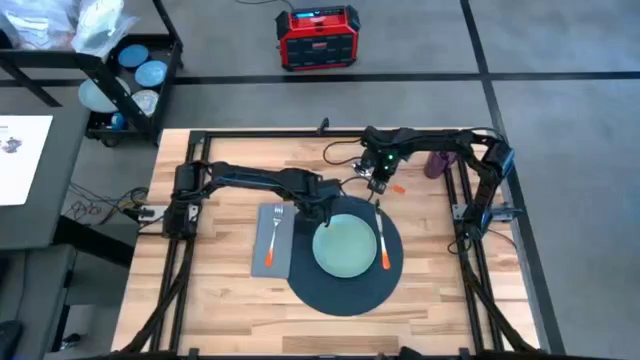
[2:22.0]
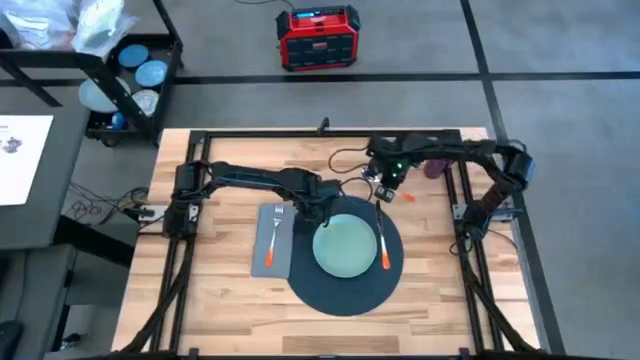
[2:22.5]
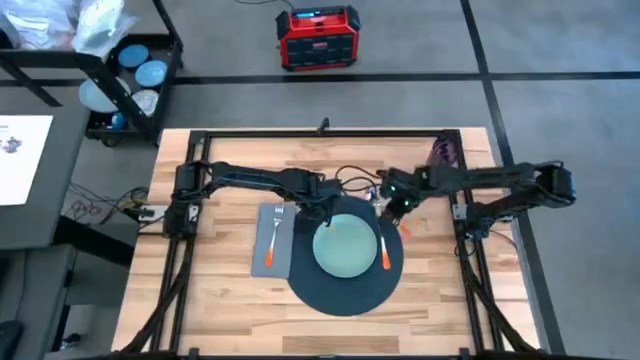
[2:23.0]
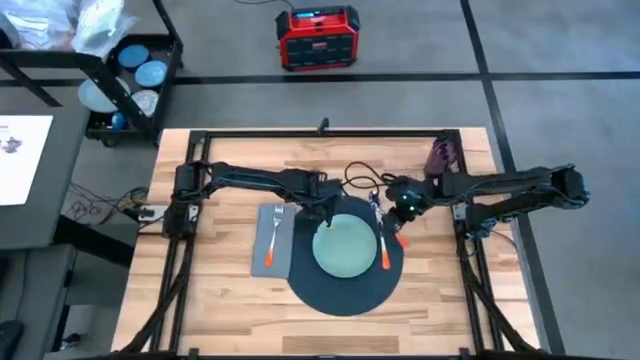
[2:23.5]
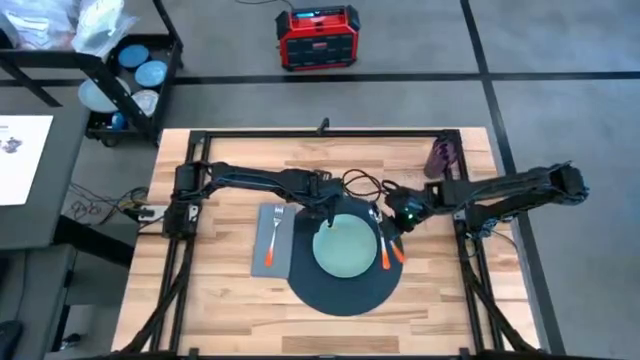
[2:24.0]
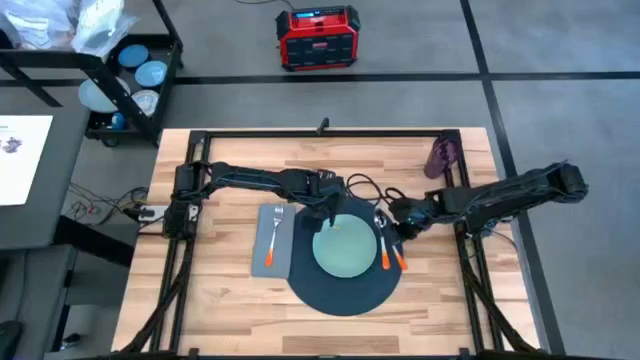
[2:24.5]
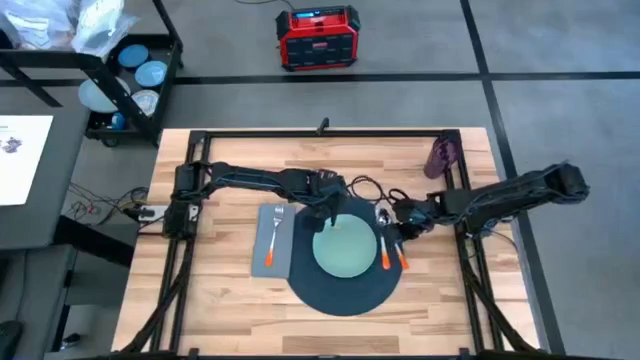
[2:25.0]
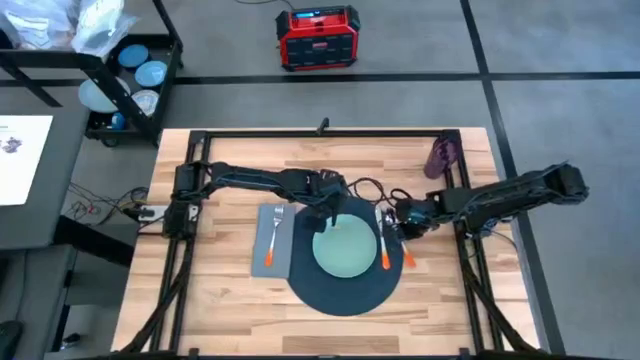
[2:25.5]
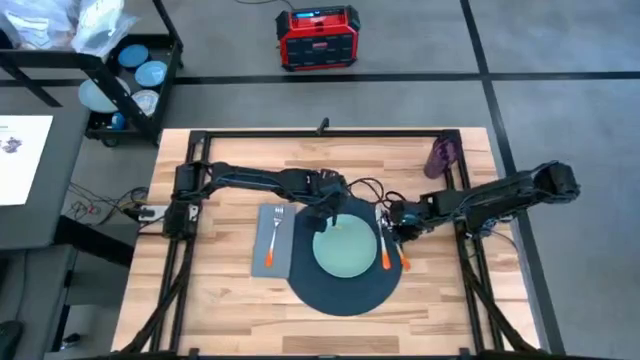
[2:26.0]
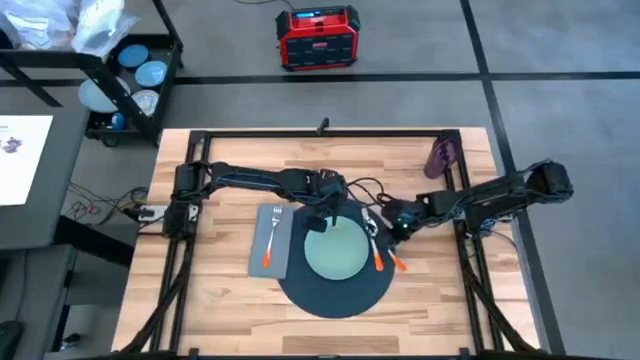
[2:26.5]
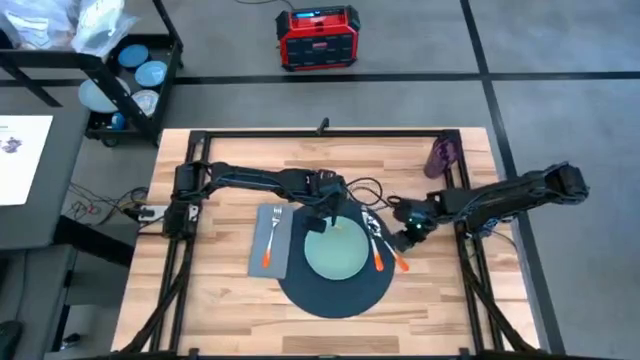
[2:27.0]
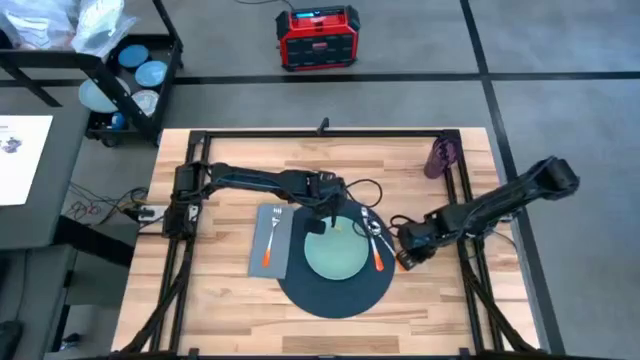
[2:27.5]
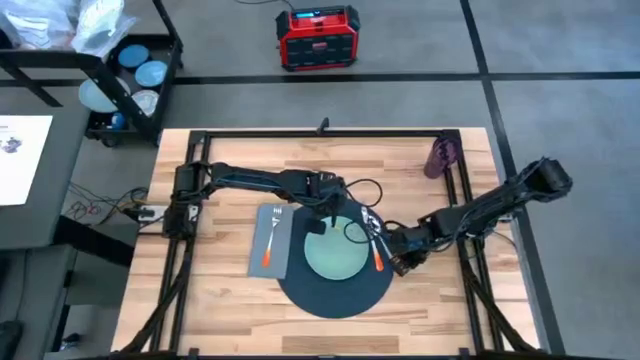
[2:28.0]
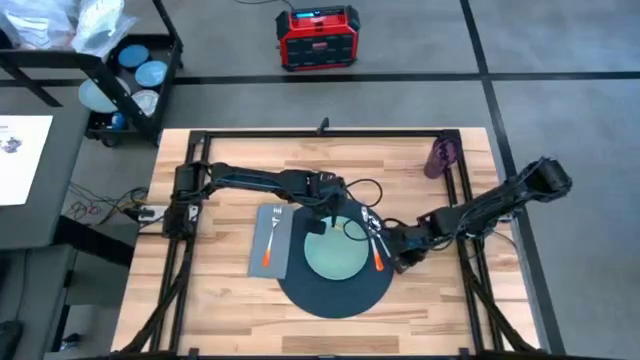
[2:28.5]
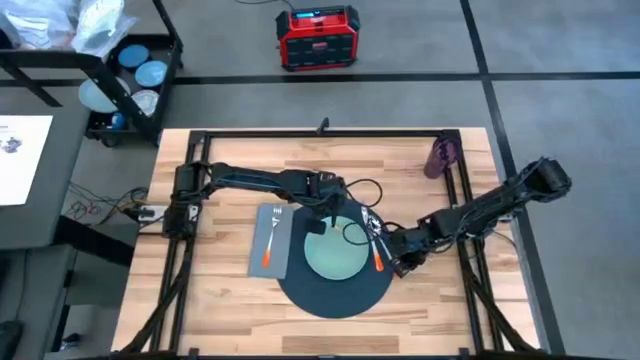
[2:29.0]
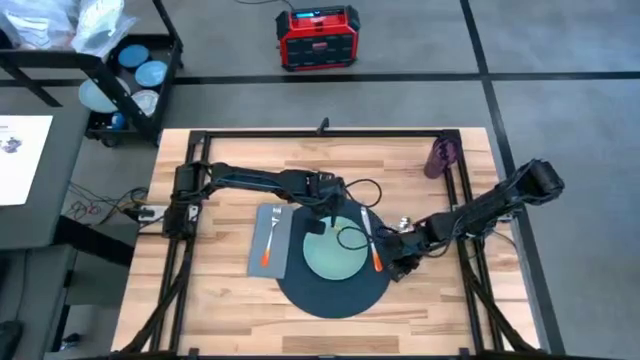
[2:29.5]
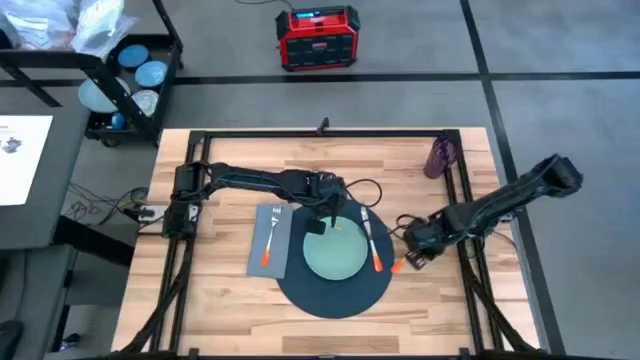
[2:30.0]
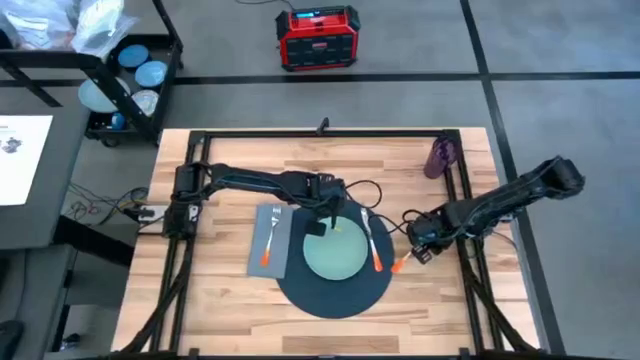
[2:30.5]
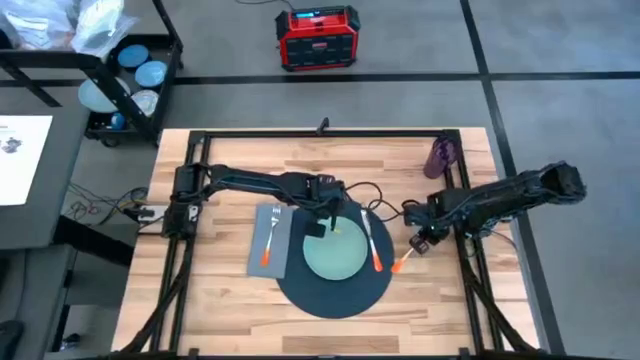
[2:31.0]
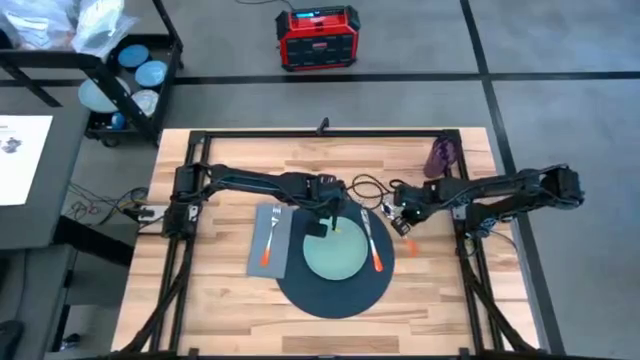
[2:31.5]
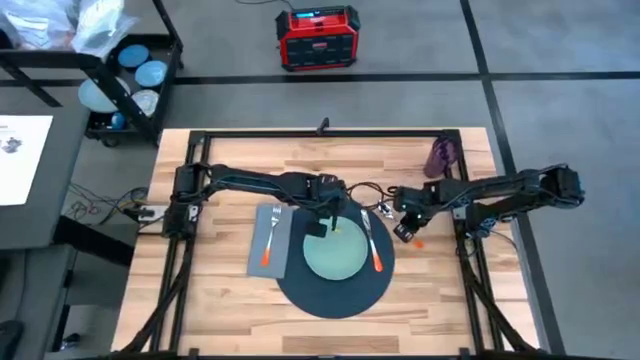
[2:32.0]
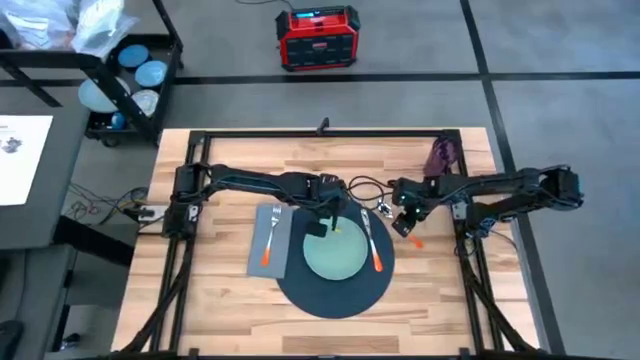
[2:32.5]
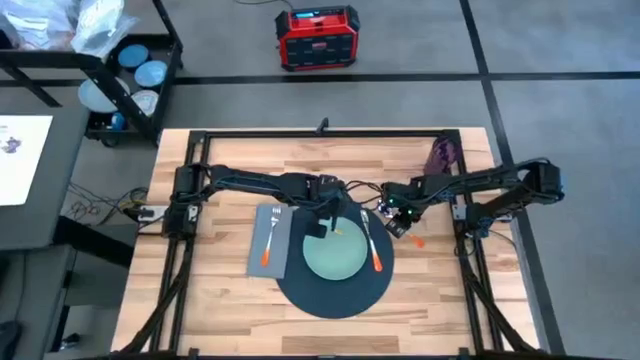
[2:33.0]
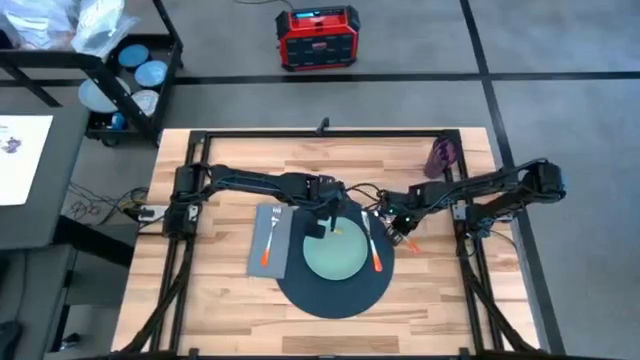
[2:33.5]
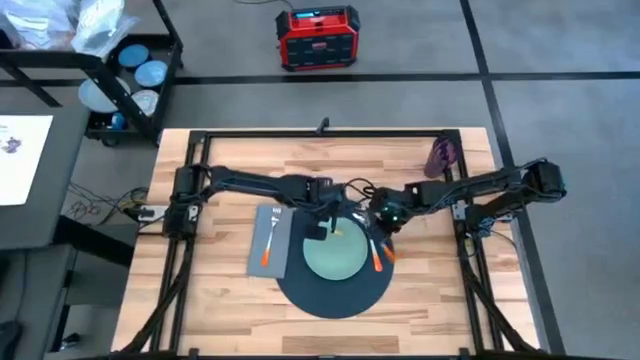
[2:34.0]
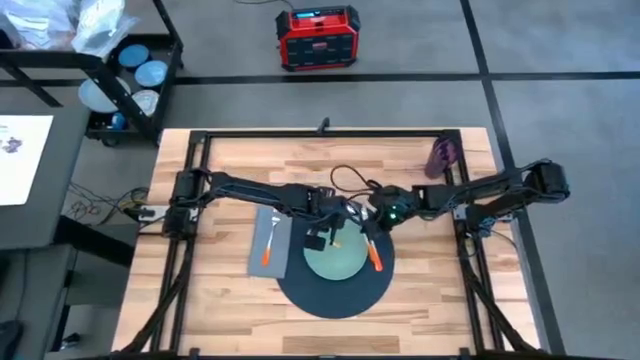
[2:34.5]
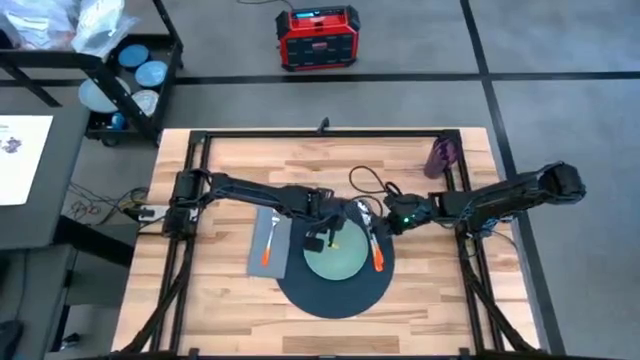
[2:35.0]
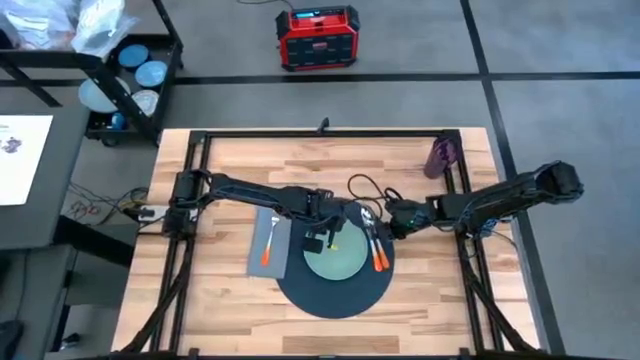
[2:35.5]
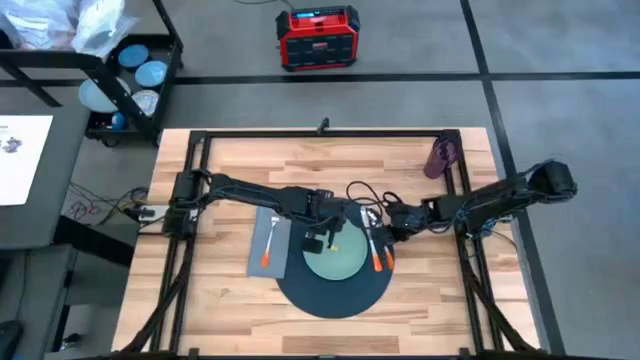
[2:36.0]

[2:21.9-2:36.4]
Task: Set table place
Put the orange spoon on the blue placemat

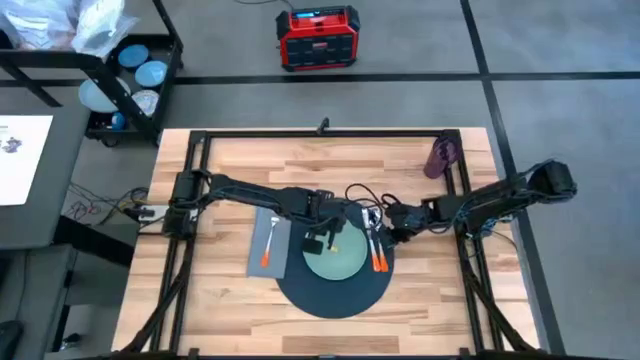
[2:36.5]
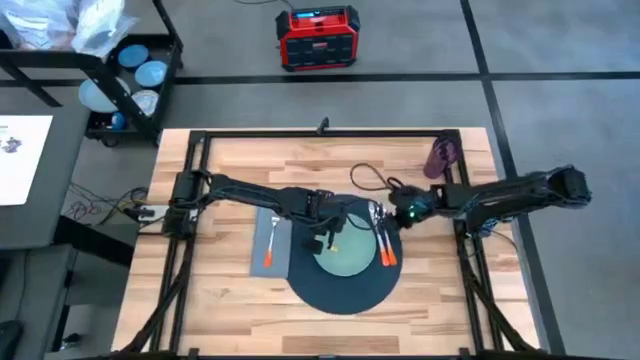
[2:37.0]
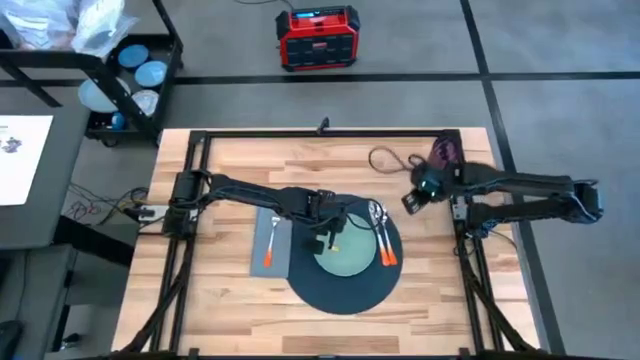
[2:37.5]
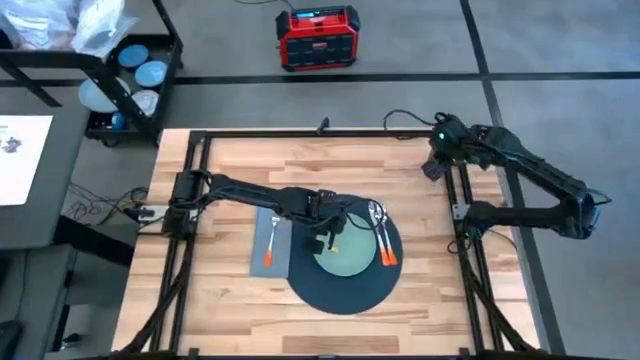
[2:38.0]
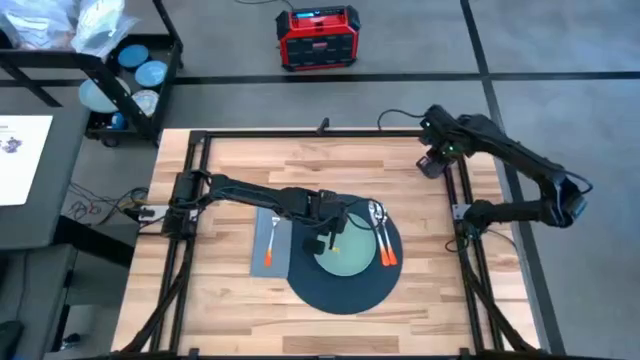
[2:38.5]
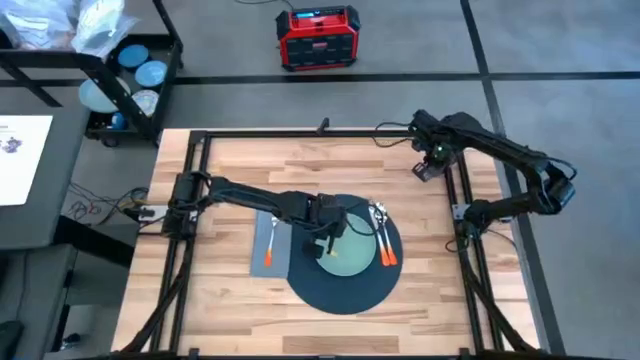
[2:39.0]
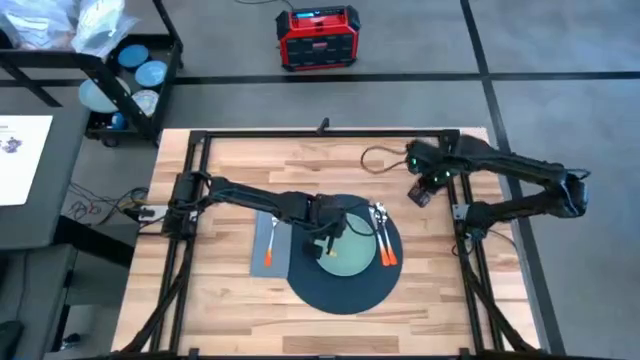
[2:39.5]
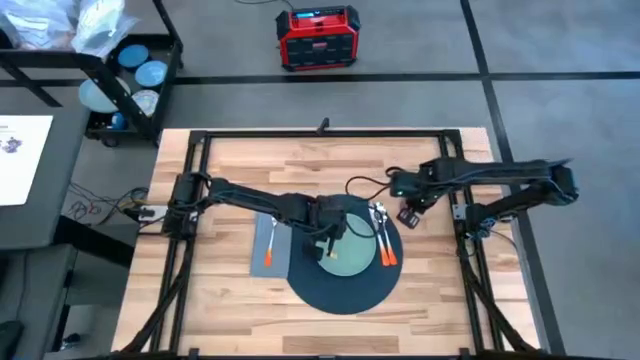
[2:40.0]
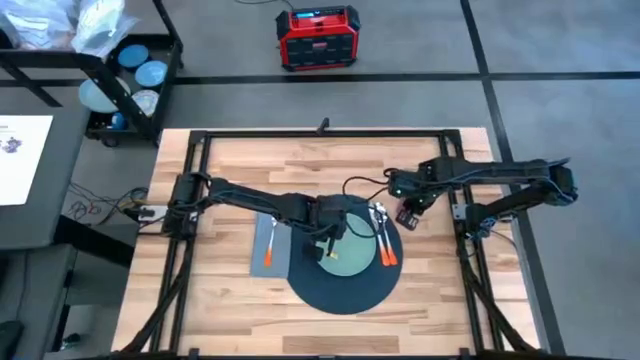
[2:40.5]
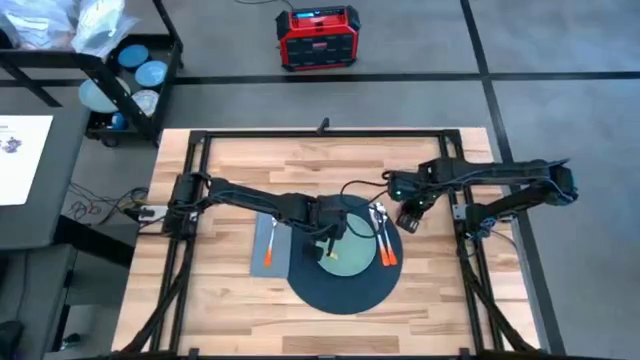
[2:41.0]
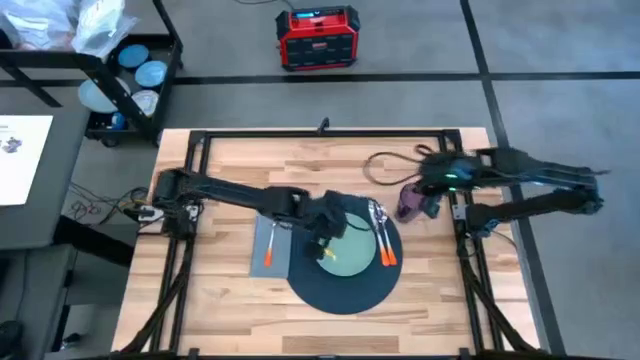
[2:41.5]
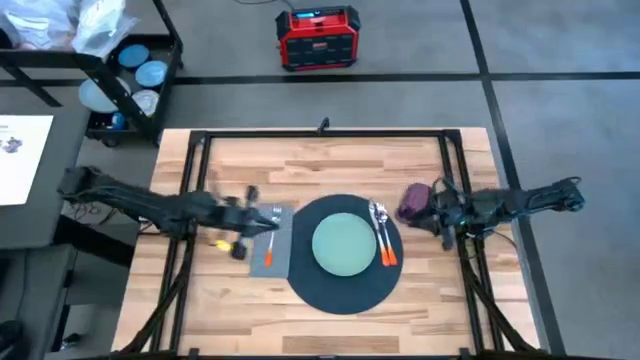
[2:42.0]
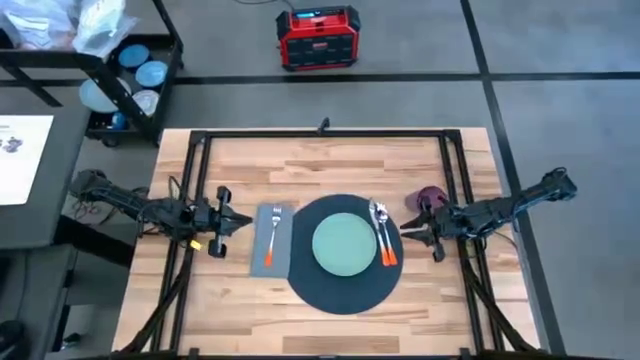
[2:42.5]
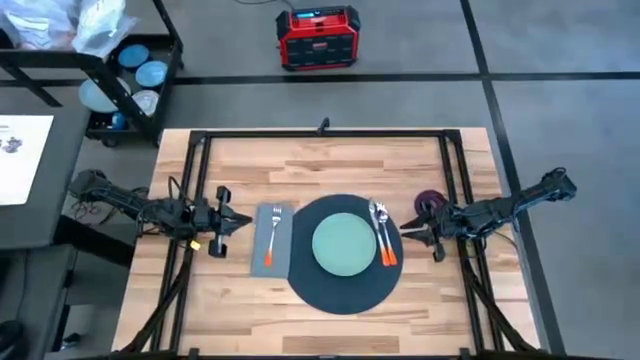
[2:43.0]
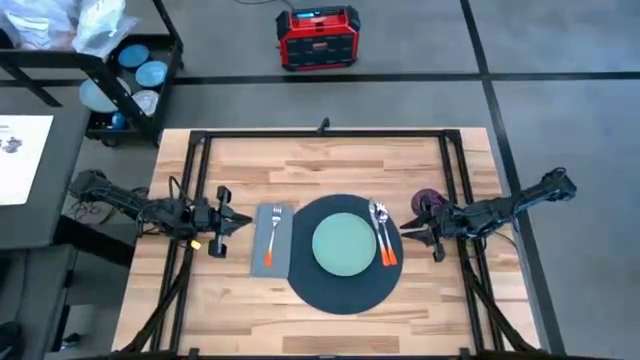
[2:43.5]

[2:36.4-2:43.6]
Move the purple glass to the right side of the blue placemat

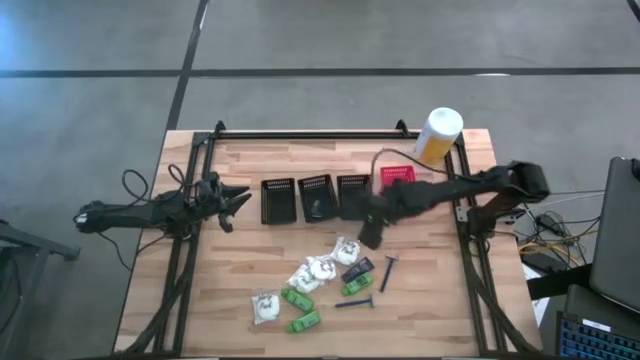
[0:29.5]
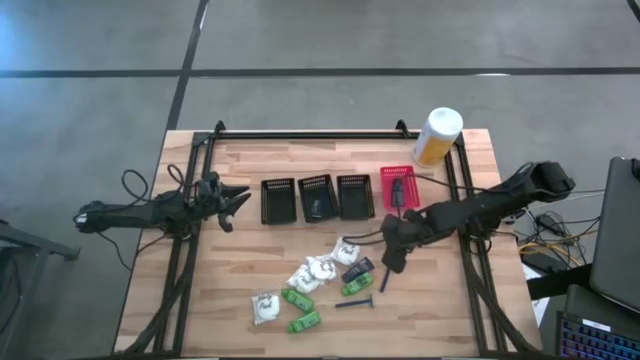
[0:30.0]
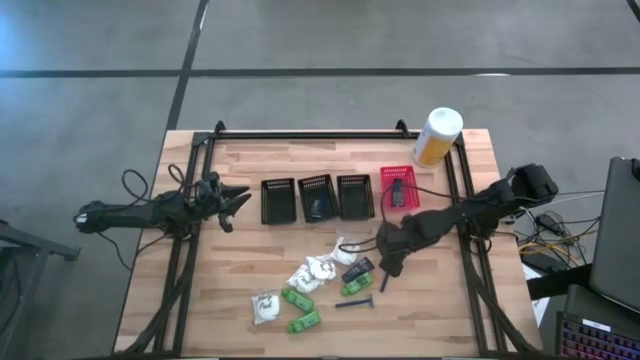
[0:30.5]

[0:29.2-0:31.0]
Task: Pick & Place Travel size toiletries
Put the blue razor into the middle black bin
